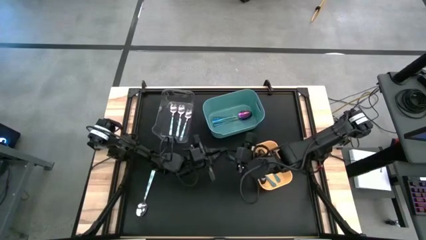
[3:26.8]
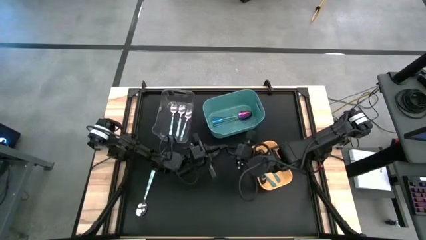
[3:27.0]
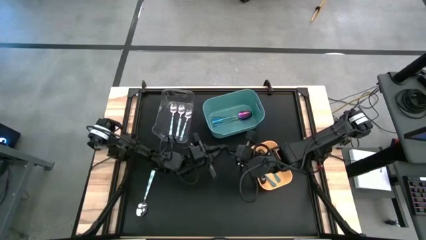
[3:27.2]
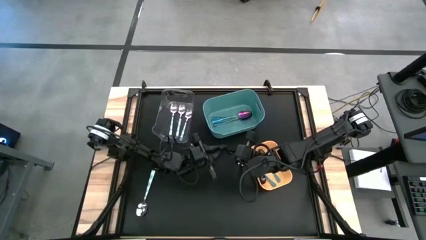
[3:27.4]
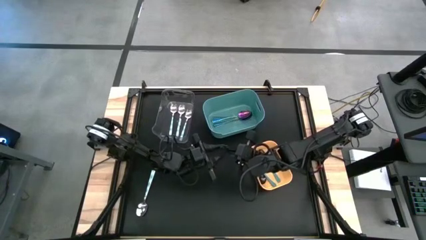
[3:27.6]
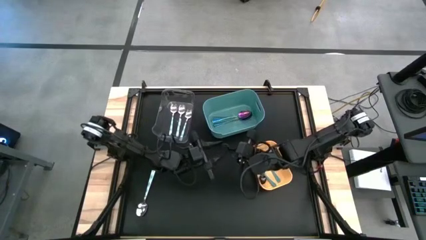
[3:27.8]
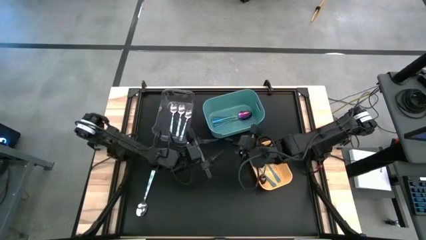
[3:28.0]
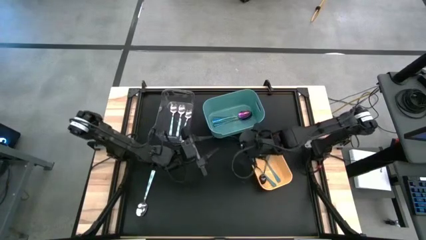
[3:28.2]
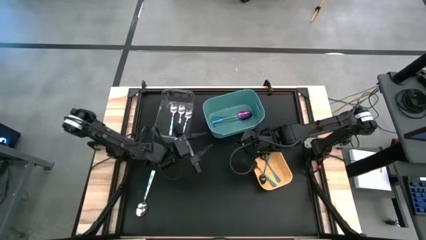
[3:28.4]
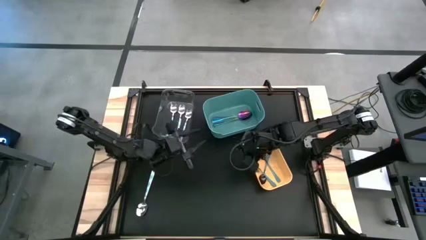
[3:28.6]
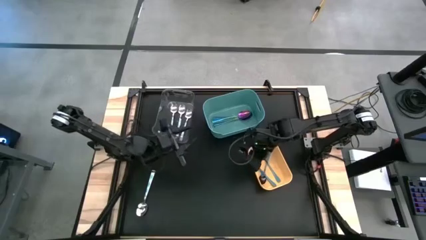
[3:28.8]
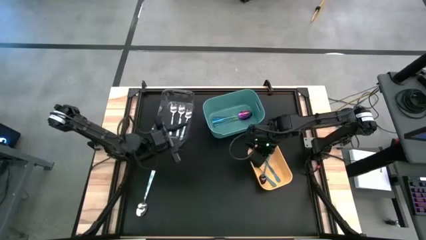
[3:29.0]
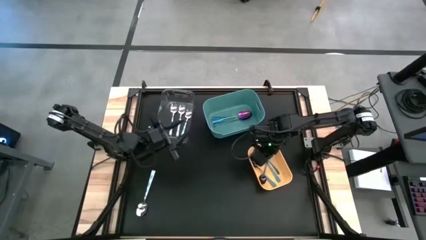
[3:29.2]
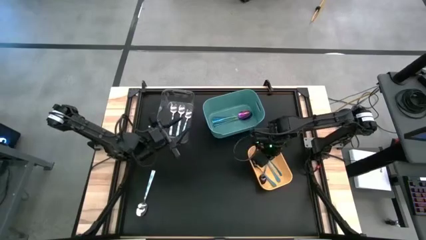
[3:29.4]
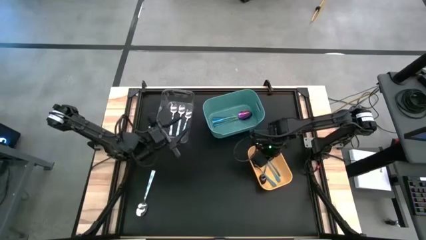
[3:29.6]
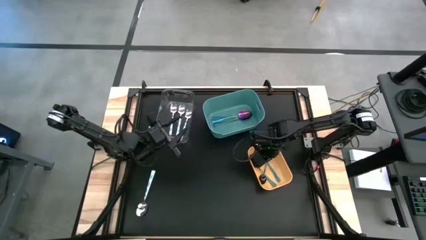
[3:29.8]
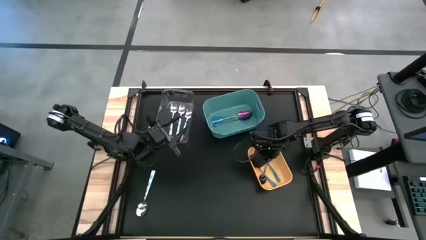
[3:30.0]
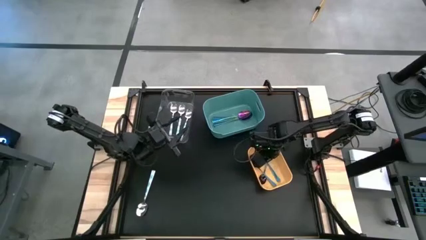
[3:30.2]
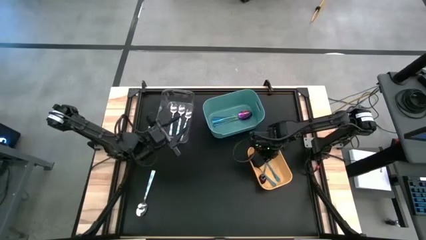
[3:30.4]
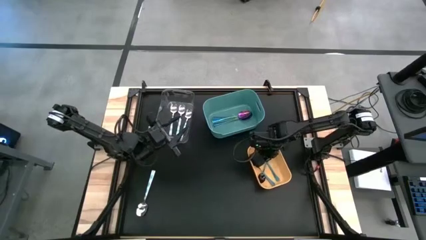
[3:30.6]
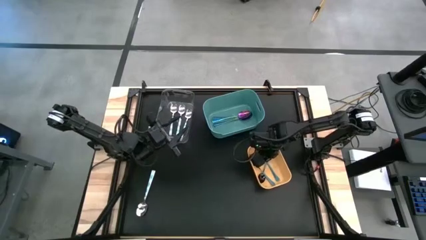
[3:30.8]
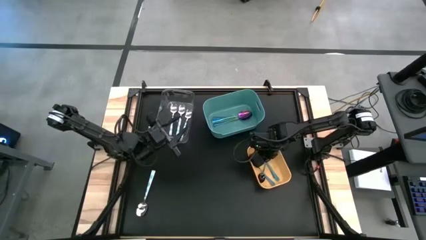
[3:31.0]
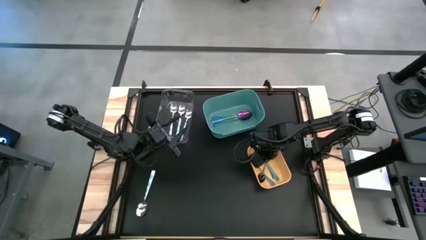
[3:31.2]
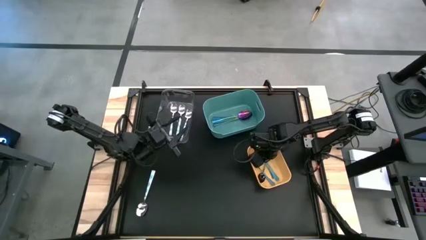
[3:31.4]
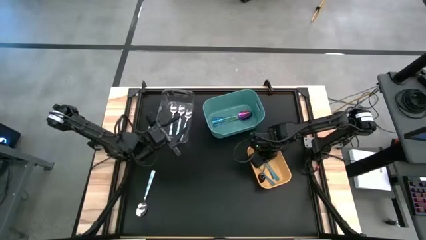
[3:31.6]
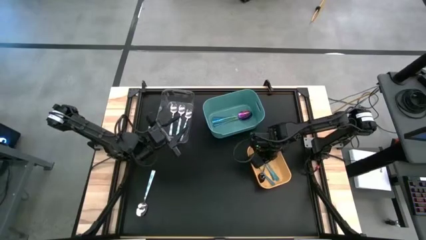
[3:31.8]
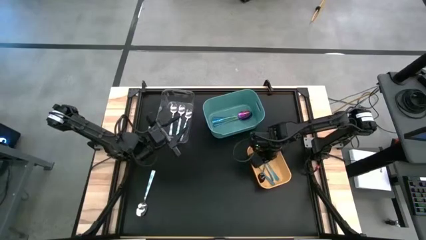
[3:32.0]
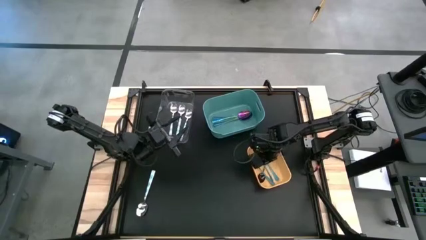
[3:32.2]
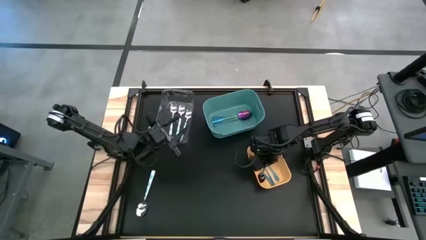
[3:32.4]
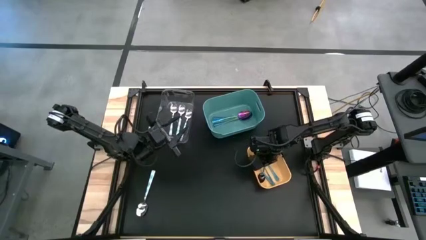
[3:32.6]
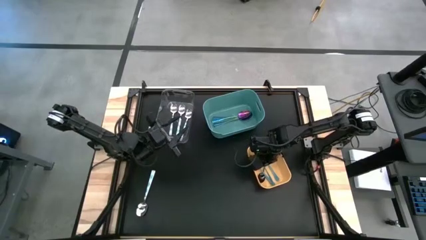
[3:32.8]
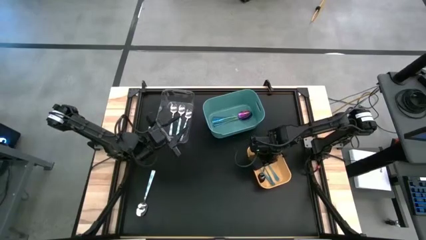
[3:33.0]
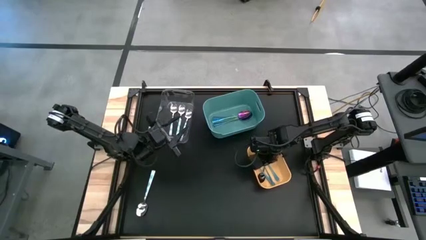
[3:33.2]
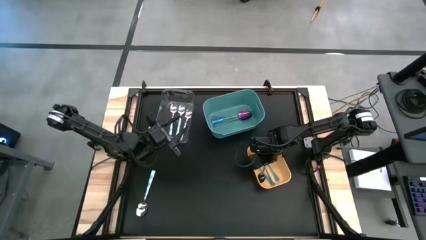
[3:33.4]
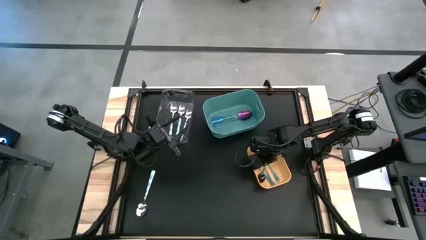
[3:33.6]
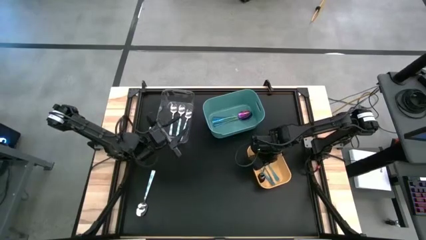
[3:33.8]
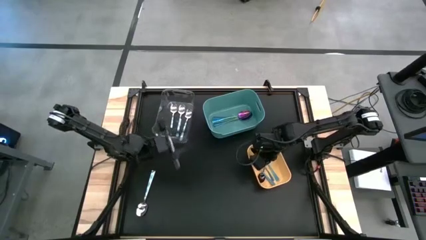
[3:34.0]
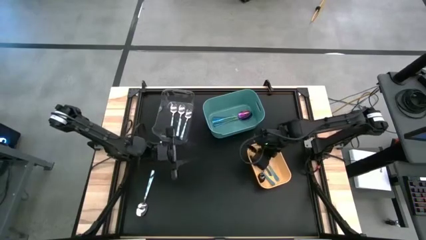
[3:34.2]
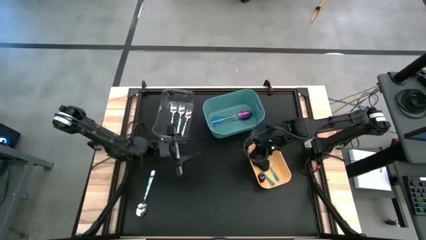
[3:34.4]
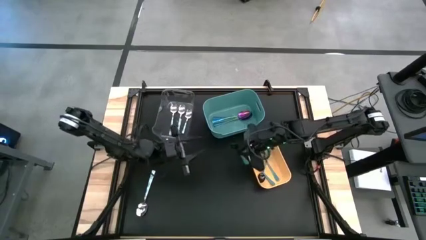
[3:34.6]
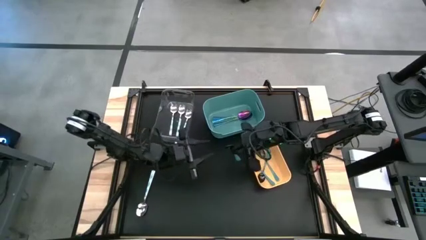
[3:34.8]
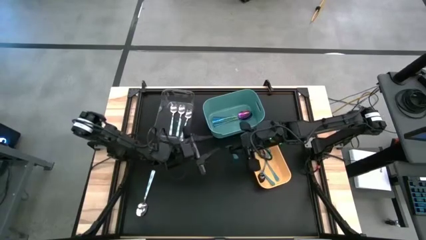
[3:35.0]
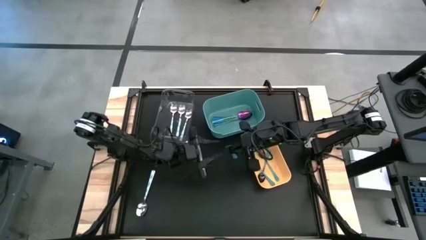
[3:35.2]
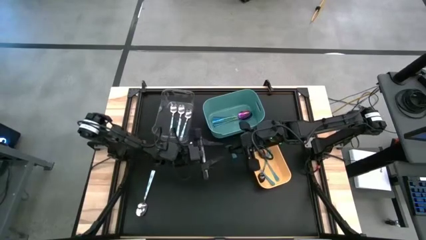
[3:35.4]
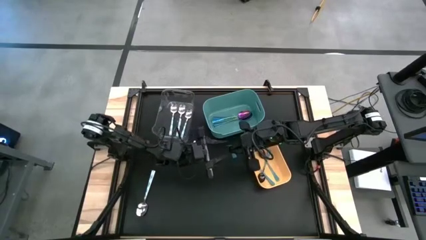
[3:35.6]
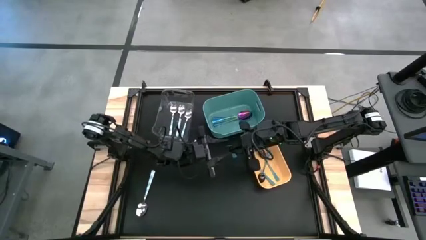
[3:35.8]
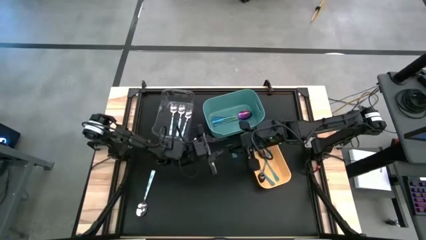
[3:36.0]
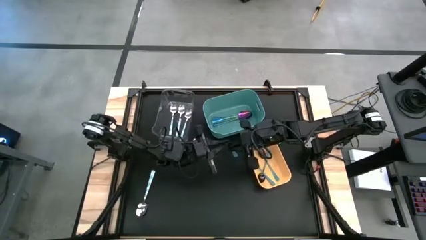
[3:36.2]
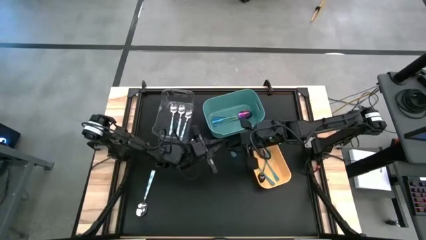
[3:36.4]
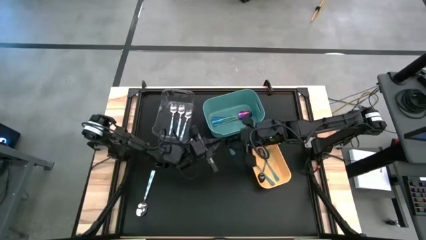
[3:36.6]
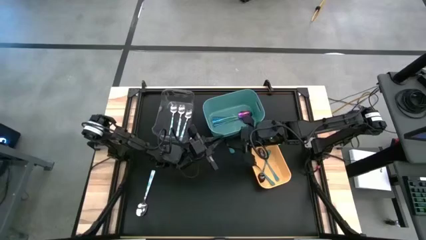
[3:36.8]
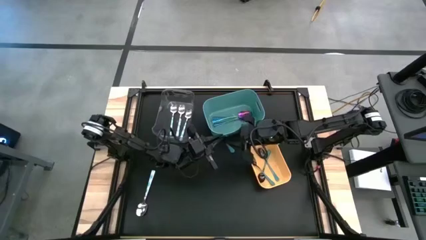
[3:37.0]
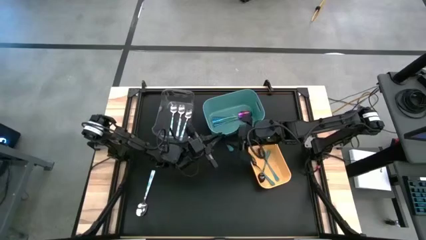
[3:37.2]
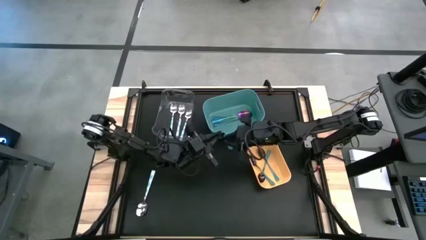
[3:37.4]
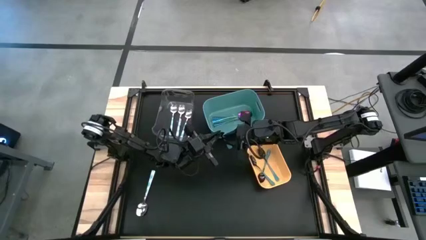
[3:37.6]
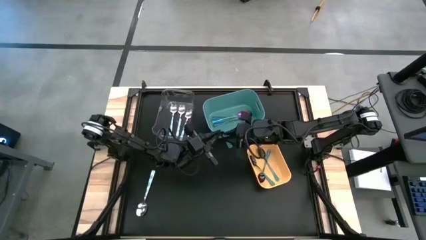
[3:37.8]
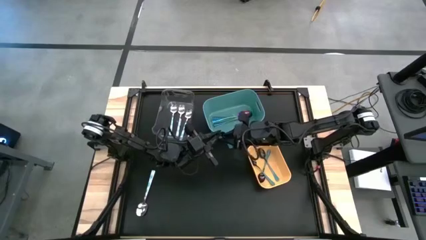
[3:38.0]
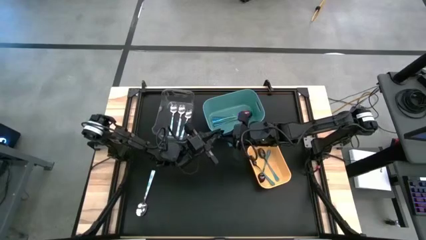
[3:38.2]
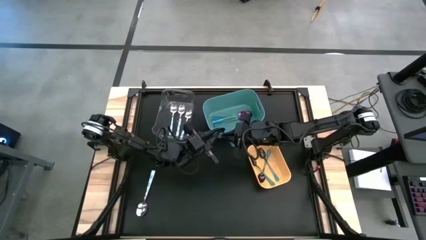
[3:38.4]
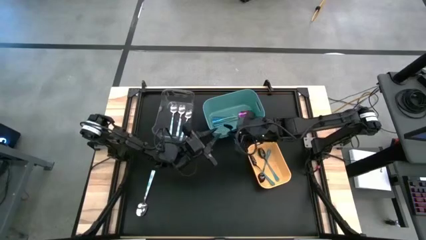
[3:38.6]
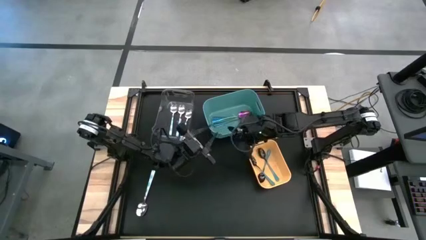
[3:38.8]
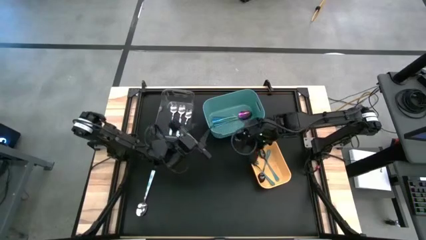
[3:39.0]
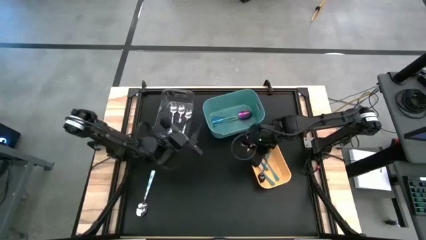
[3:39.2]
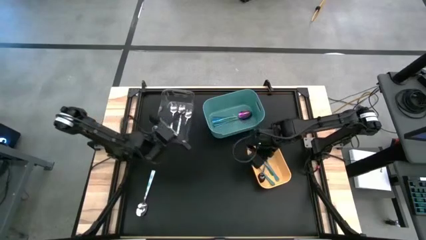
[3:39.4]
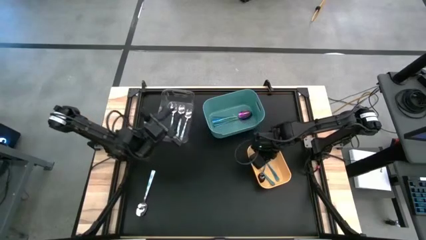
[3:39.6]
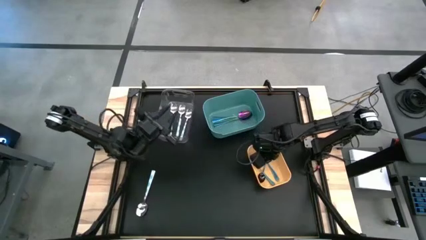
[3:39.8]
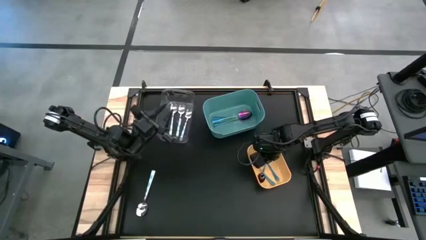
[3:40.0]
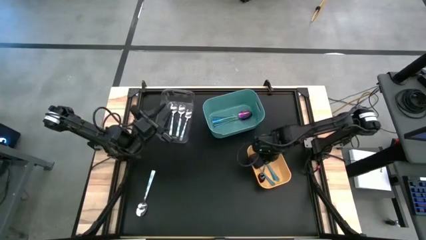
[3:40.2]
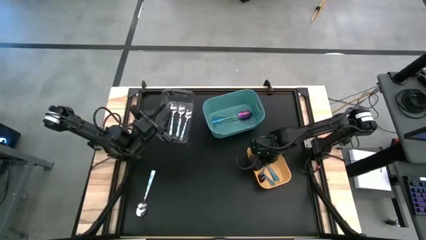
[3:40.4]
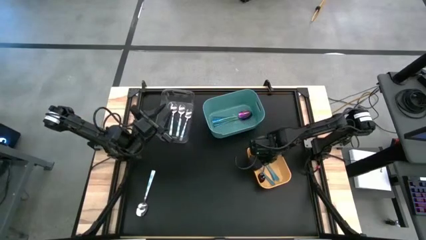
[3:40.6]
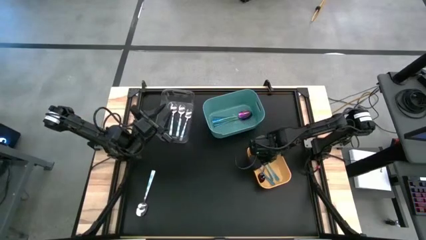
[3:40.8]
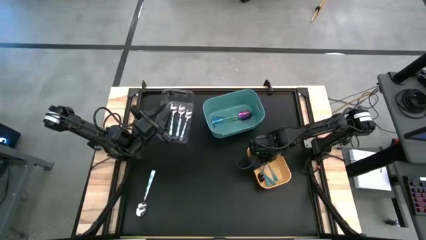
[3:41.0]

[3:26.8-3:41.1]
Task: Sort silverware by color (type)
Put the black spoon into the yellow bin

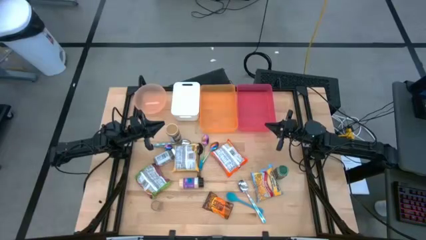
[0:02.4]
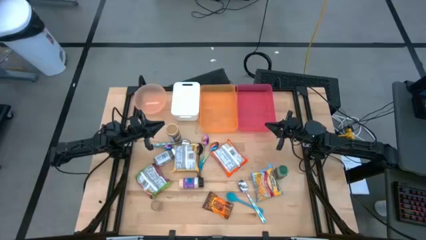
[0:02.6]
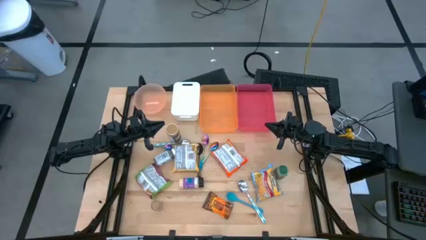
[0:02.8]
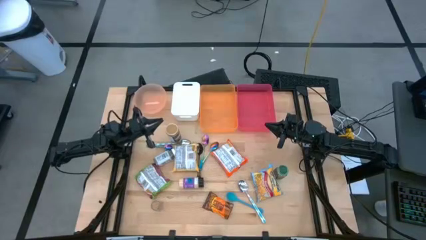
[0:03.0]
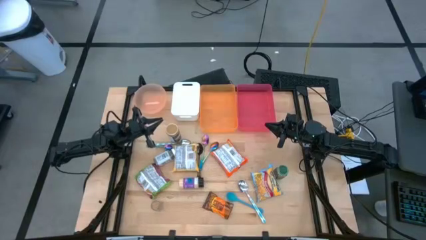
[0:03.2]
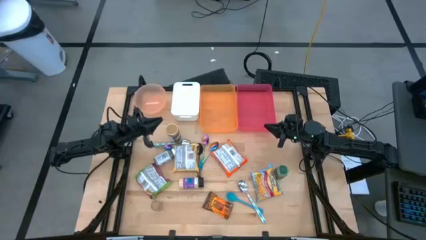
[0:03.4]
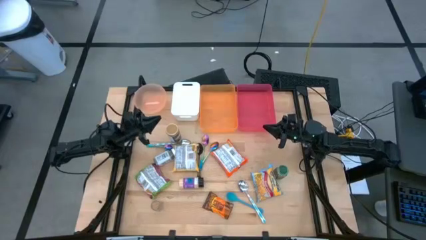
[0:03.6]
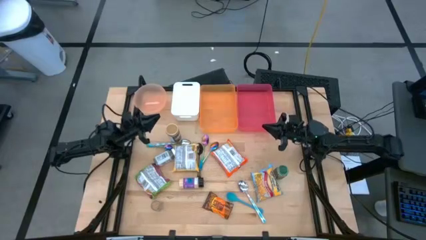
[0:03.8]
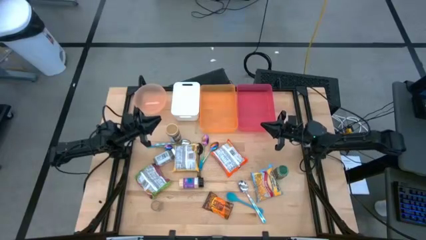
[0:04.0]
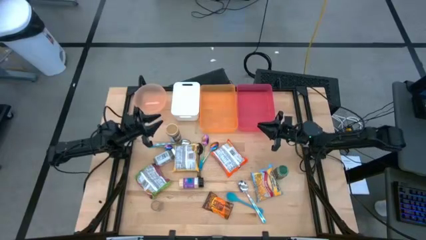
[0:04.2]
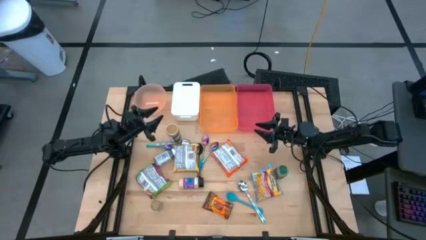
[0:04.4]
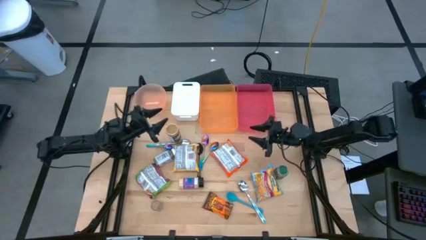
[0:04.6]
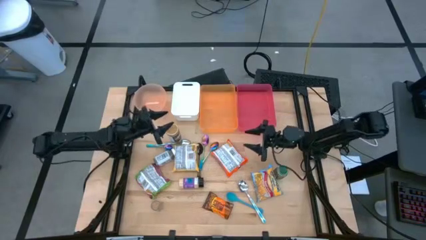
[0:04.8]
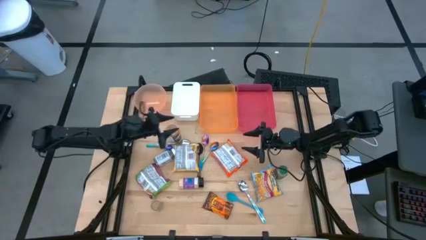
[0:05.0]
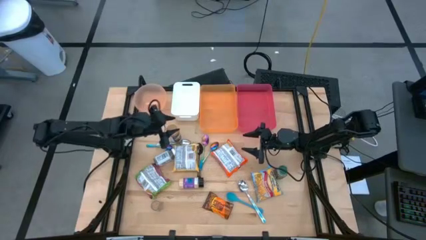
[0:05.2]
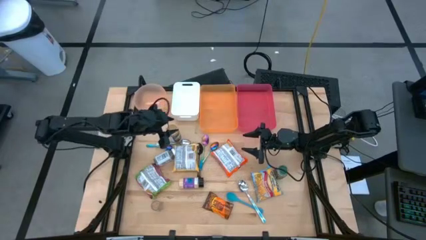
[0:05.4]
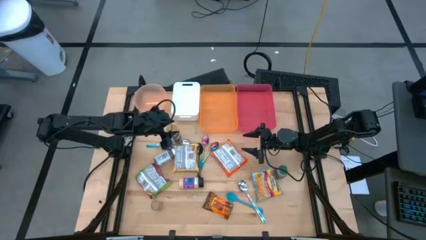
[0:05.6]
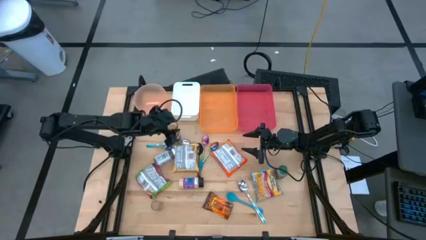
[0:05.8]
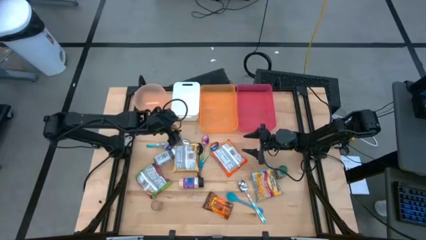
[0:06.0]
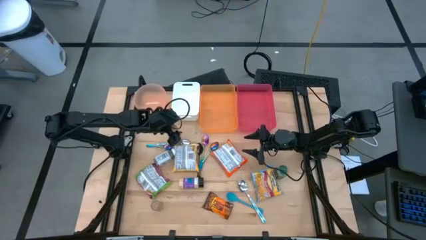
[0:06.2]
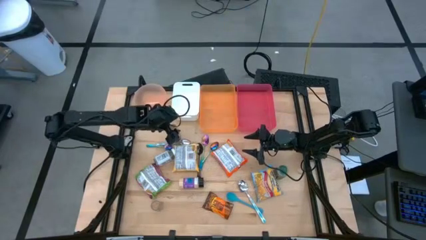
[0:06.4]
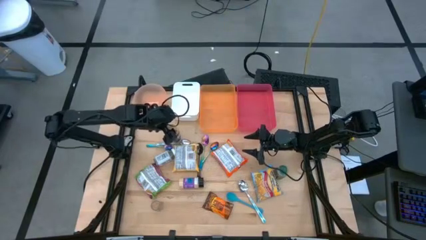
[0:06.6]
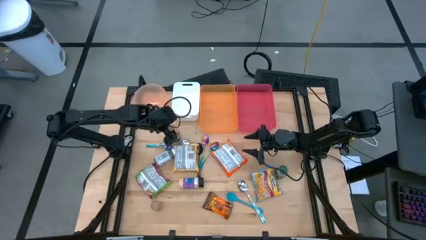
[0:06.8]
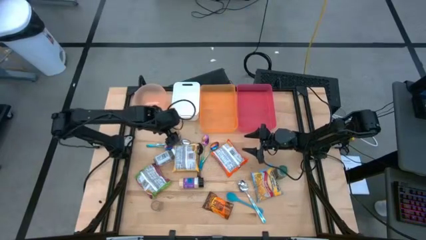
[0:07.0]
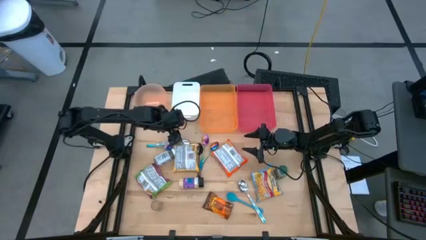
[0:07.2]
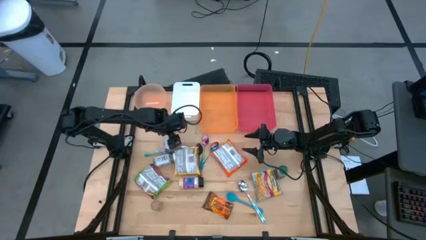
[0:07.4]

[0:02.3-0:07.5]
Task: Pick & Place Food Item
Put the golden seasoning bottle into the red bin
